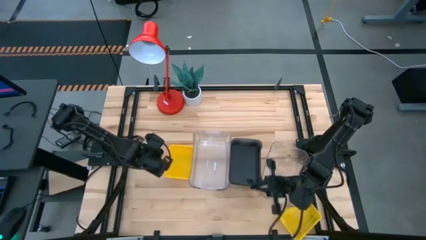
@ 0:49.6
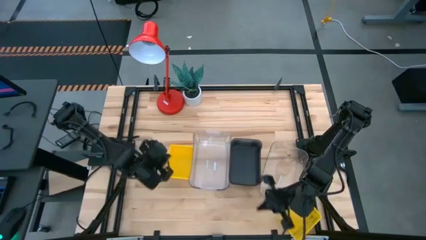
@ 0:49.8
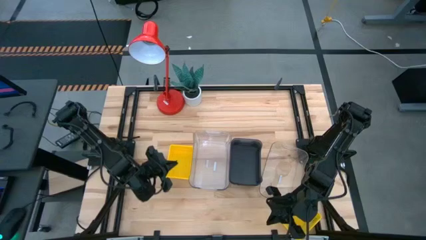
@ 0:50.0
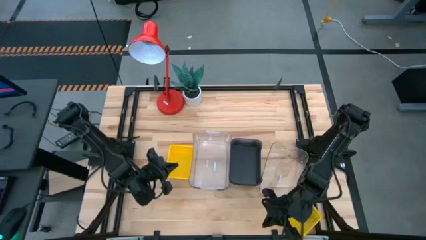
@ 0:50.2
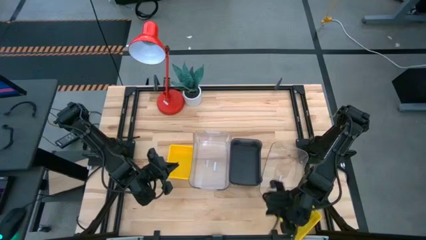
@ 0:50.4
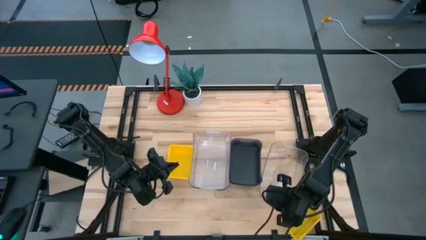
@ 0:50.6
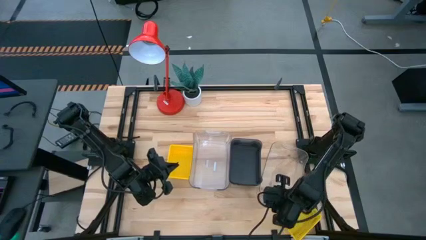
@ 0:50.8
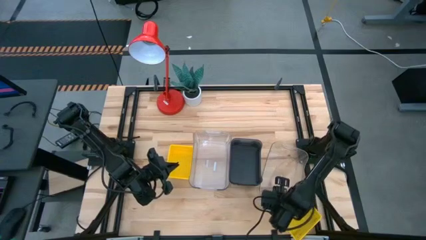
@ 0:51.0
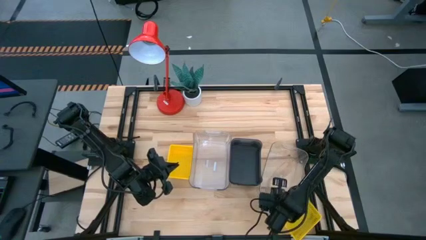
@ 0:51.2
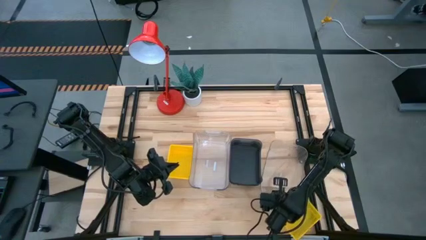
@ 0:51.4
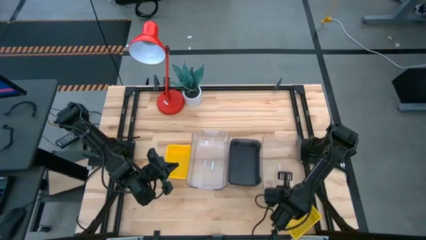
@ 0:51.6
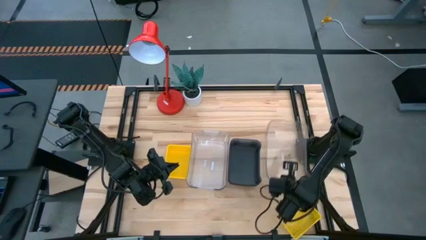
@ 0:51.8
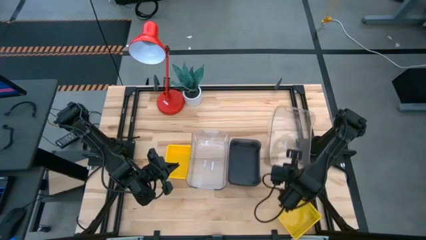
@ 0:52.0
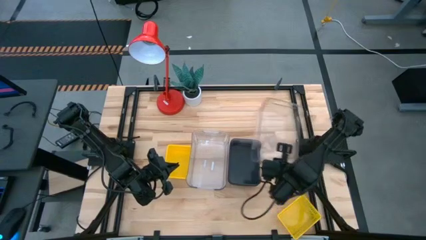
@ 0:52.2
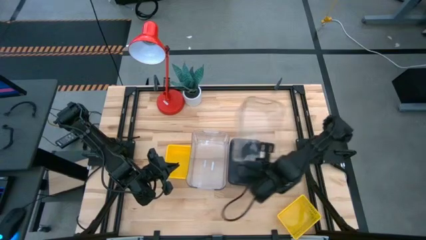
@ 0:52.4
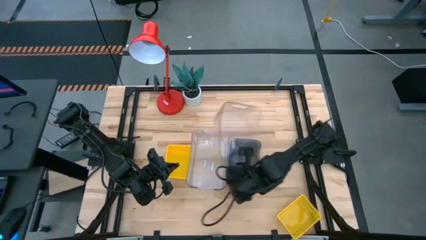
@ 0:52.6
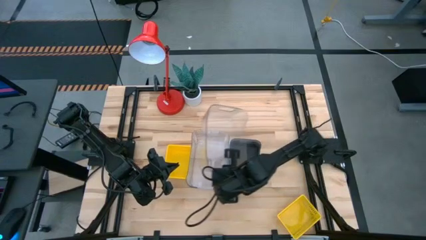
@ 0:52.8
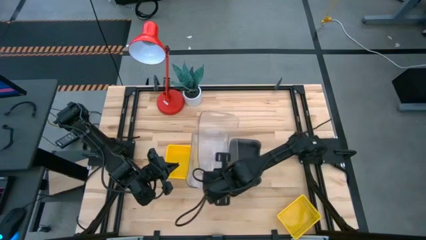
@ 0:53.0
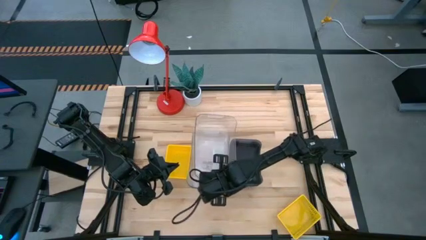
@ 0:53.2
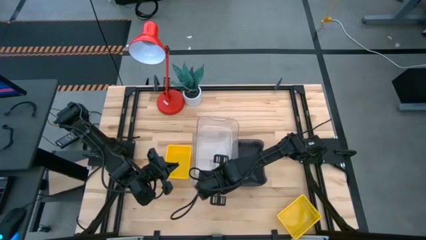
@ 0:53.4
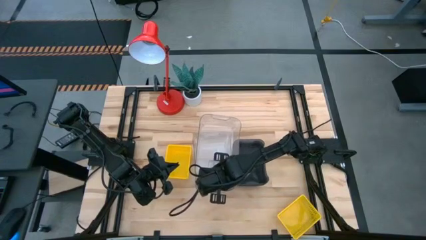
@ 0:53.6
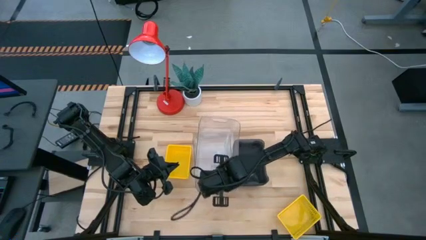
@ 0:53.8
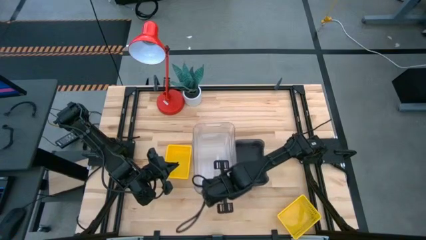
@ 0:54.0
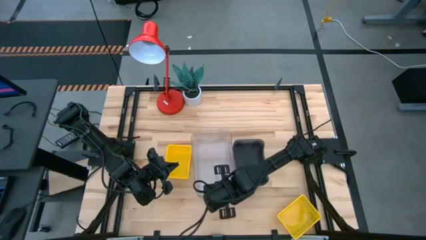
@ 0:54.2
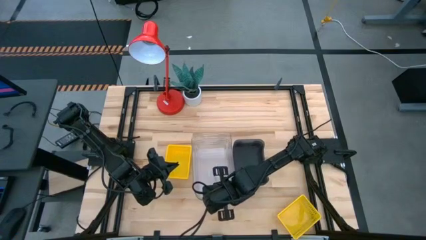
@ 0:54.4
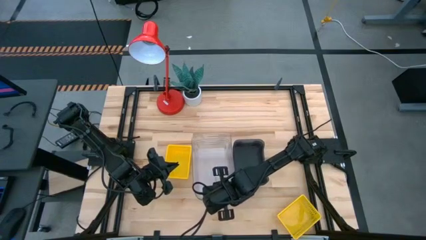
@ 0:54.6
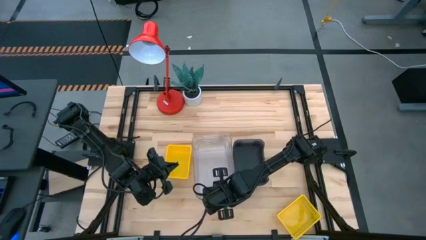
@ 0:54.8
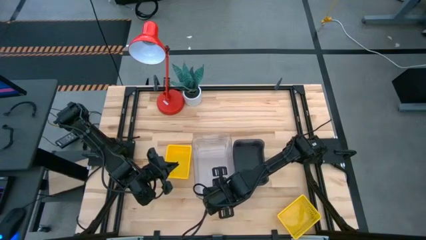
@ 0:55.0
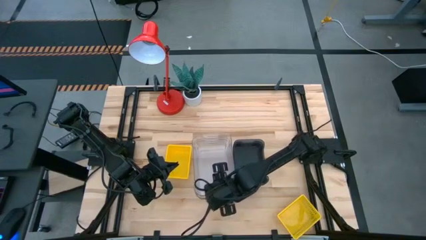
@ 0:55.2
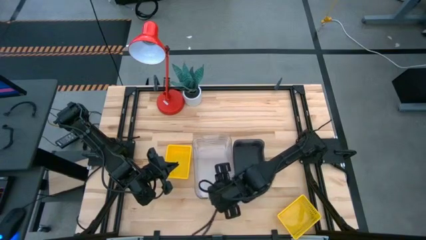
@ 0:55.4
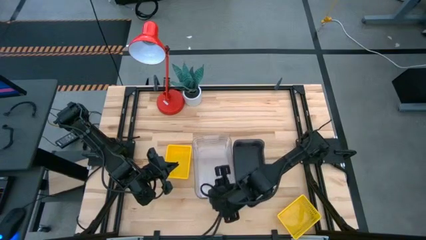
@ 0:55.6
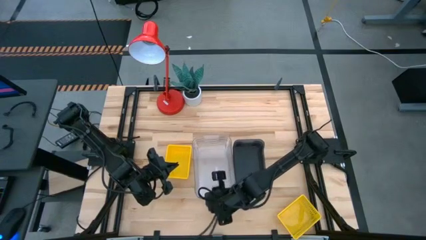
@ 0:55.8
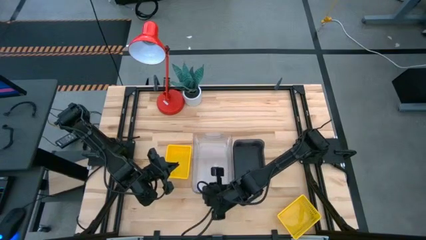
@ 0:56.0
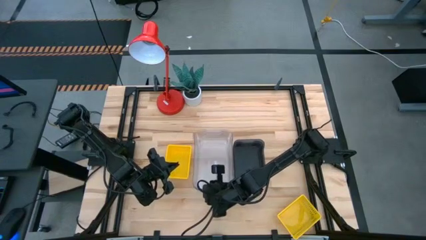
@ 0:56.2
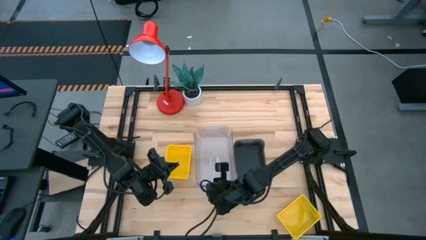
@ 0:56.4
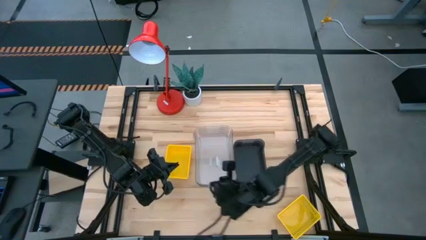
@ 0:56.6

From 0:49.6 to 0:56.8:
Stack the transparent bin on the center transparent bin

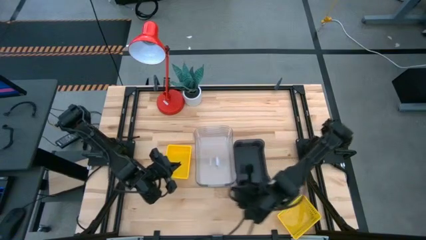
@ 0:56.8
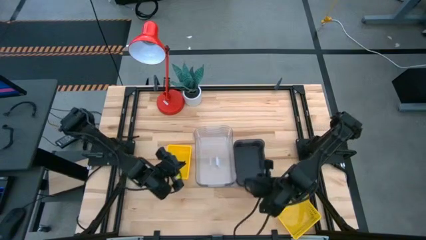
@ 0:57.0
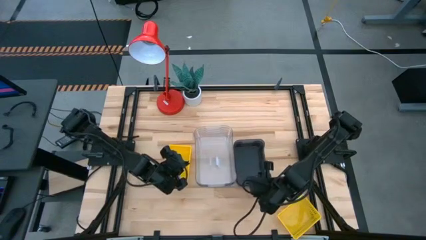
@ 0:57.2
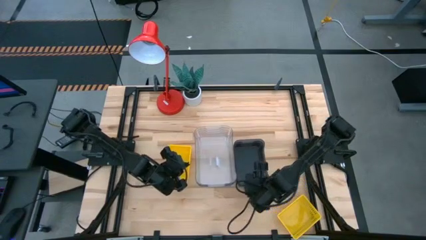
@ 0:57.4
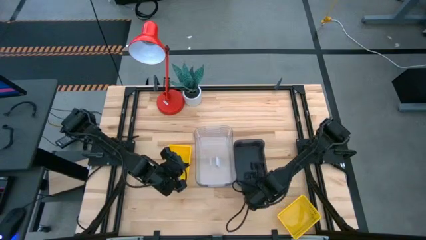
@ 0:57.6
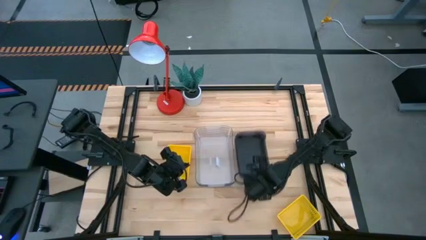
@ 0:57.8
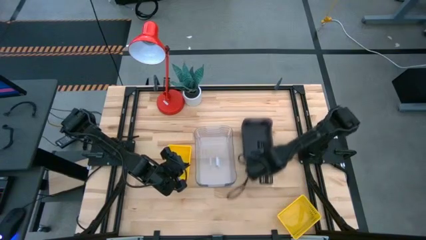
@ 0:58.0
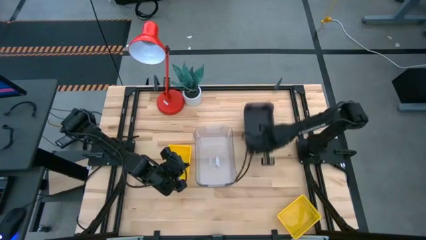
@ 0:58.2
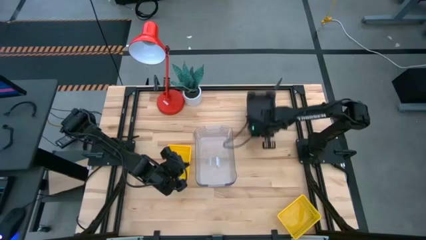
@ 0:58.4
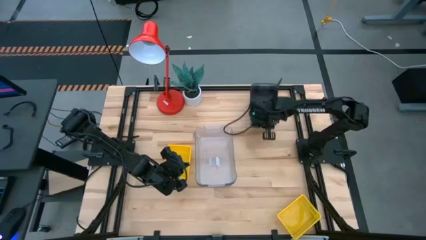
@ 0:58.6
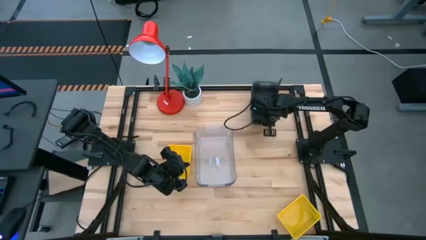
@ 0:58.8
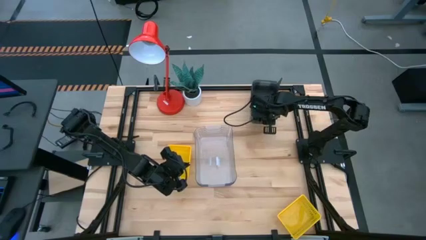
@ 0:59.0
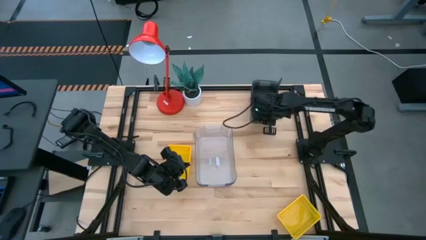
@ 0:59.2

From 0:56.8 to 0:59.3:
Move the stacked black bins to the top right of the table

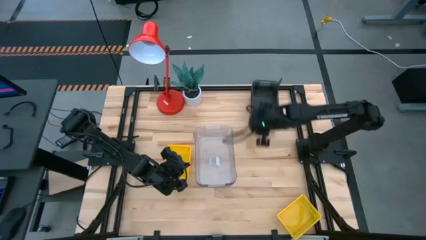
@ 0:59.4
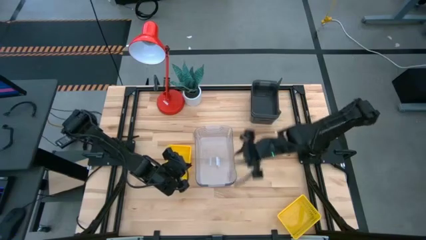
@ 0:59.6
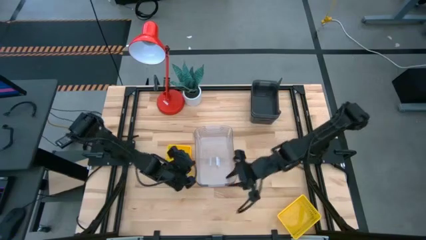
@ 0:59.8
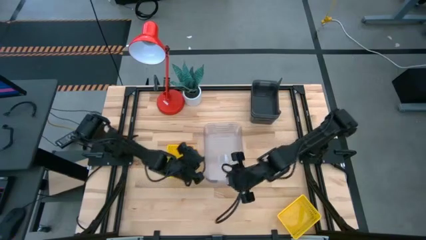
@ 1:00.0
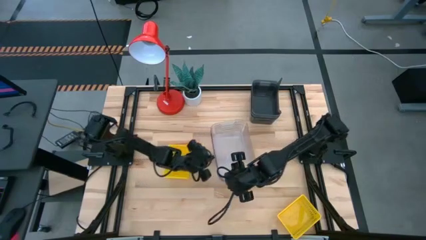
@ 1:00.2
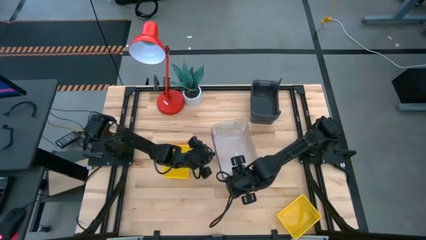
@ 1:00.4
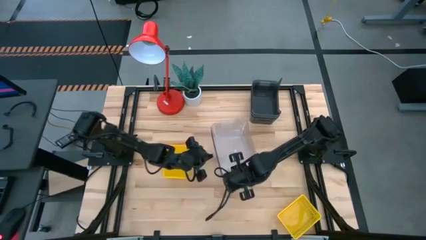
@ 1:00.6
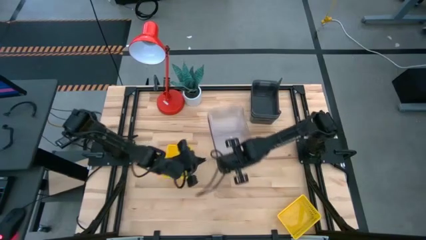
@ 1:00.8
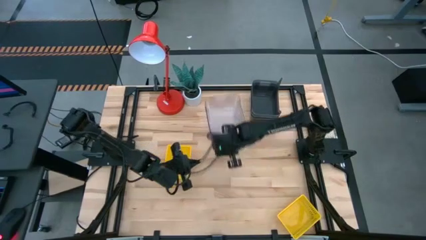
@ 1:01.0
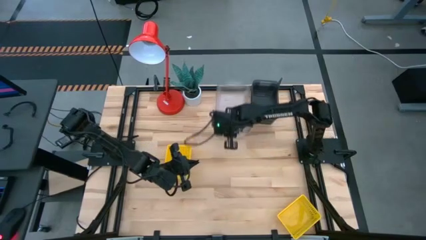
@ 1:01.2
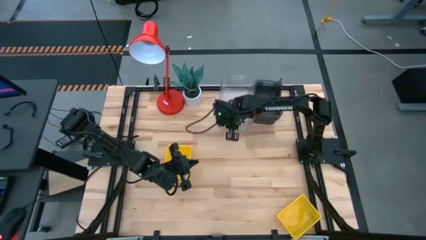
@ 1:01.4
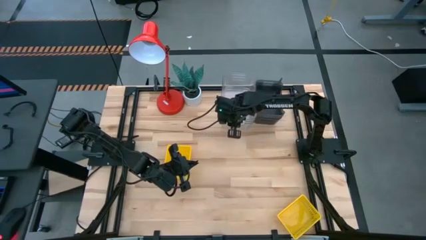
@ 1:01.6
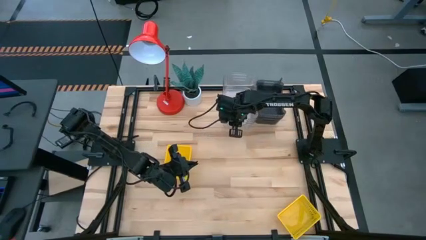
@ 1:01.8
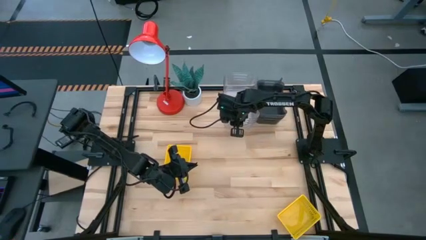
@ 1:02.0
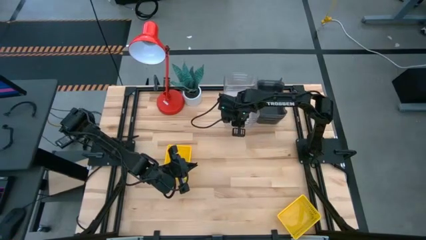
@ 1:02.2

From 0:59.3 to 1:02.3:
Move the stacked transparent bins to the top center of the table

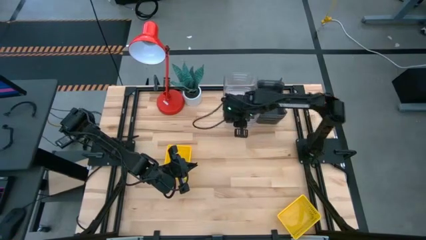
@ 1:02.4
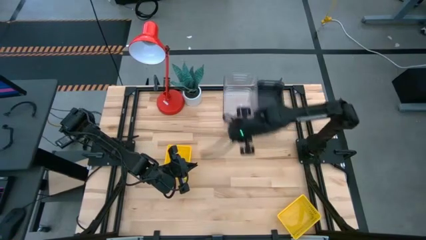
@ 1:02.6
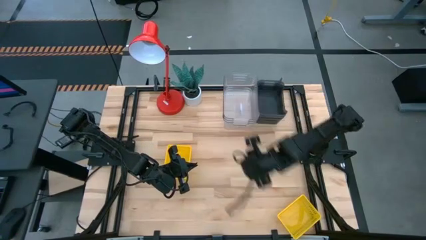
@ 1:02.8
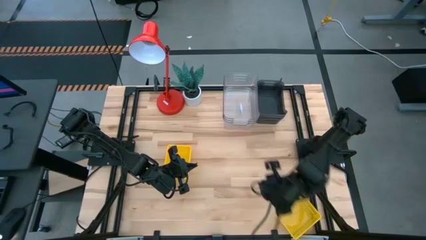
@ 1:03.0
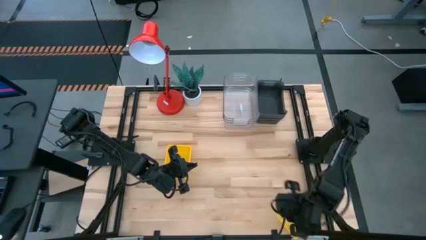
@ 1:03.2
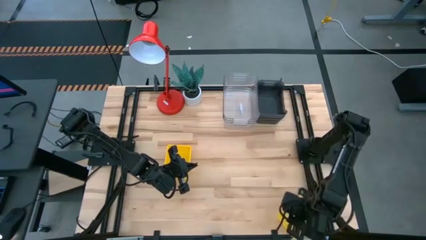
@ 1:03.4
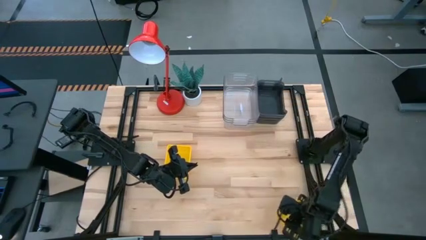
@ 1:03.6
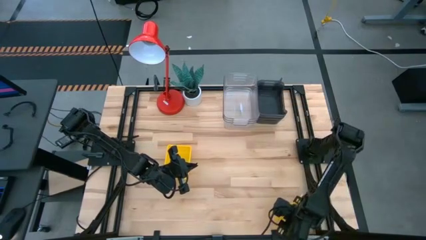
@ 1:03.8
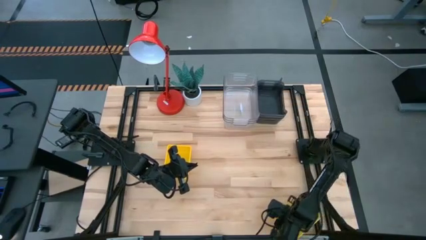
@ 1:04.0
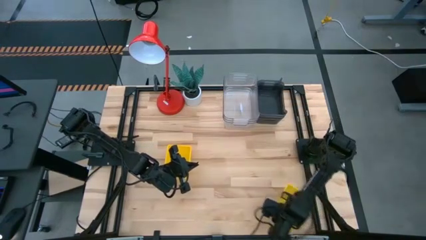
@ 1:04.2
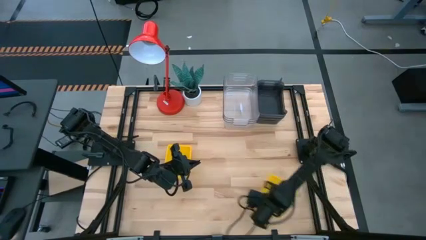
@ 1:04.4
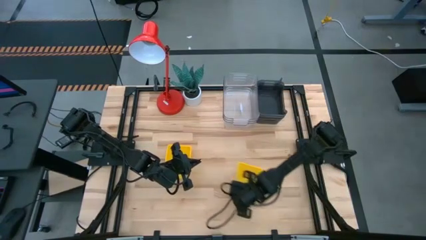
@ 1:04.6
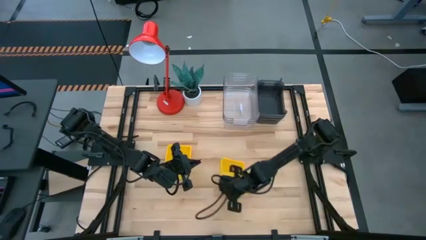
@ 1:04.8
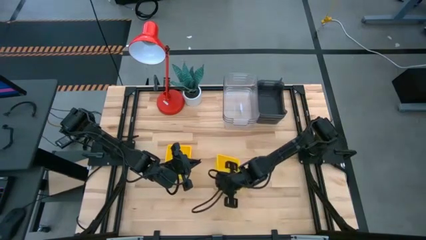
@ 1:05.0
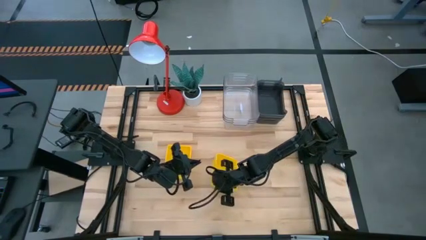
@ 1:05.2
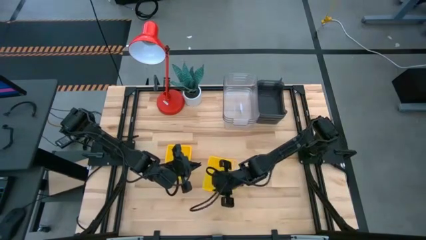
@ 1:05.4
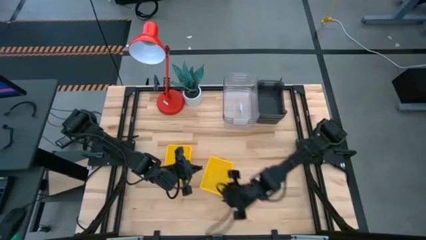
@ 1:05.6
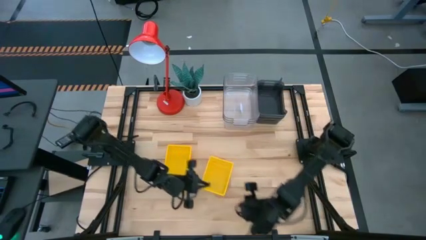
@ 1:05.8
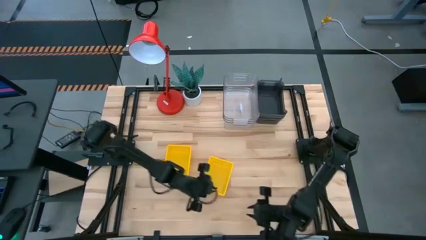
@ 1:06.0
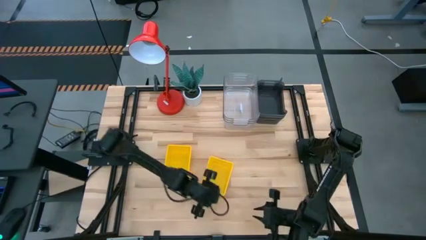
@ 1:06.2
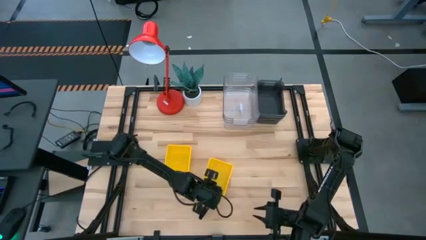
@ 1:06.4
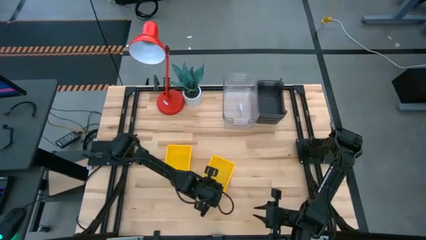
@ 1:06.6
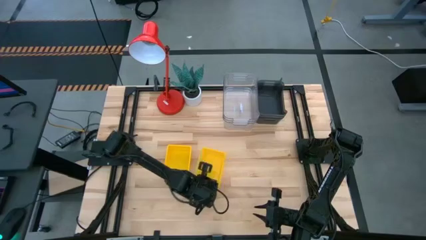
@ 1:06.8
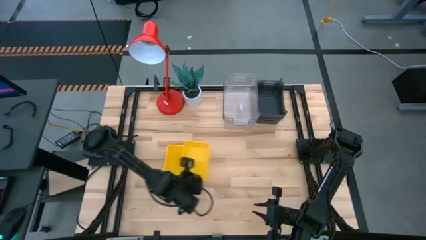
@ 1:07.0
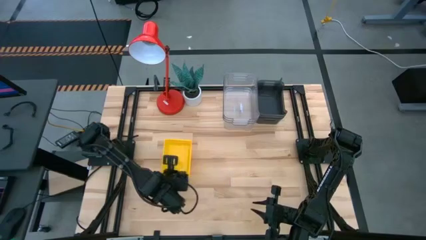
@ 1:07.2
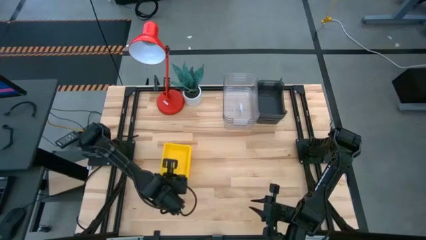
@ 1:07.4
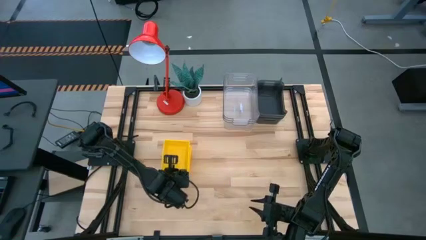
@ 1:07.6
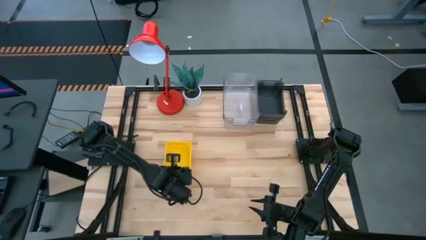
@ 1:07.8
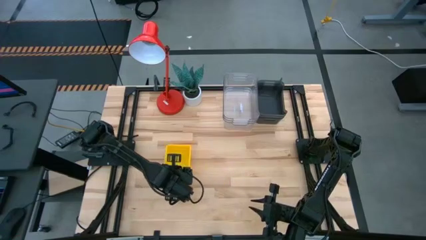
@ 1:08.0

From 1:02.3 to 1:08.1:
Stack the yellow bin on the top yellow bin
